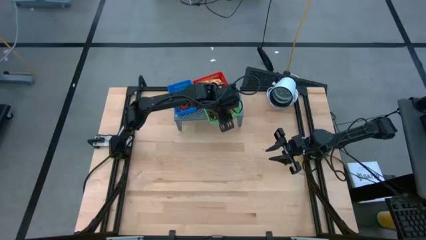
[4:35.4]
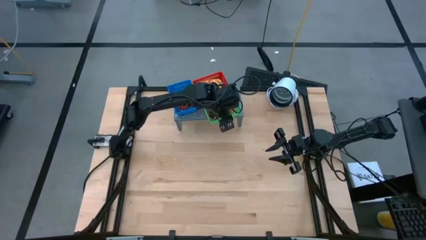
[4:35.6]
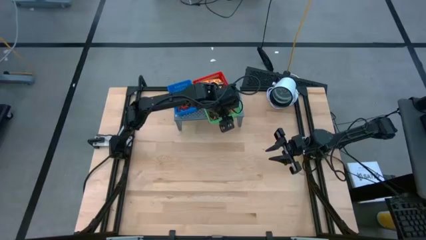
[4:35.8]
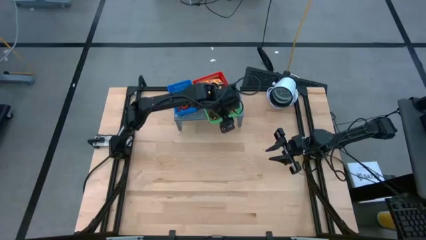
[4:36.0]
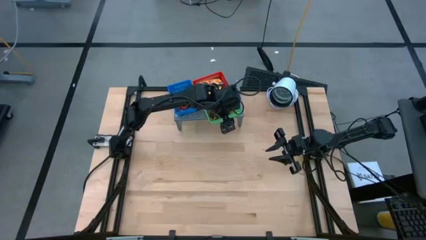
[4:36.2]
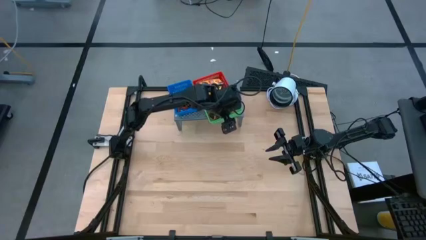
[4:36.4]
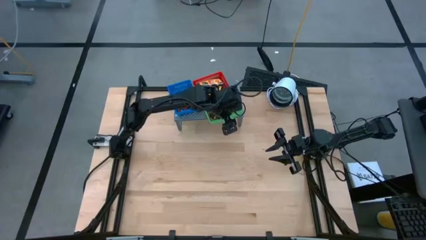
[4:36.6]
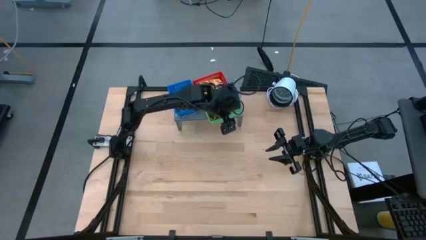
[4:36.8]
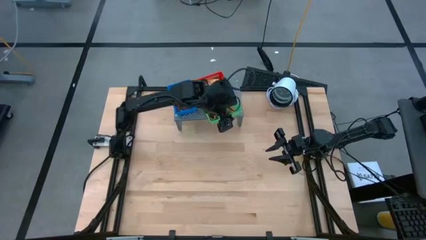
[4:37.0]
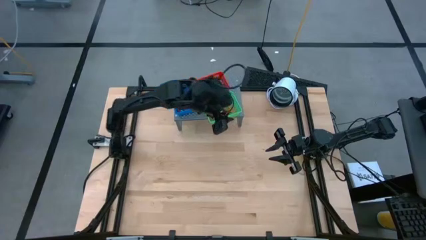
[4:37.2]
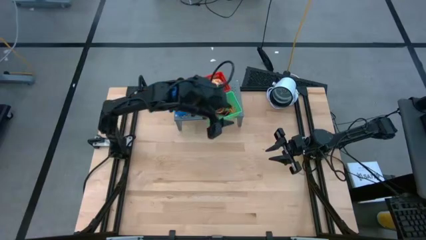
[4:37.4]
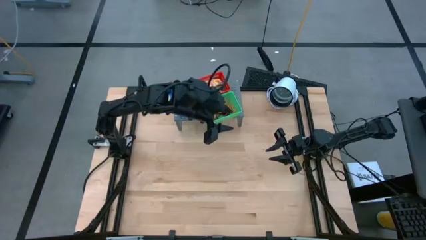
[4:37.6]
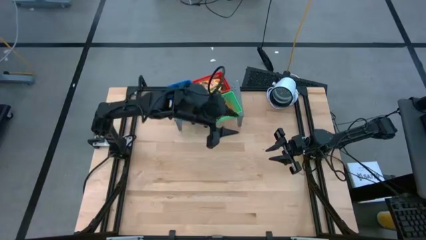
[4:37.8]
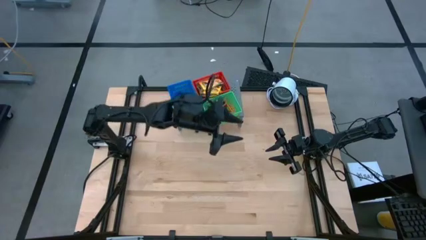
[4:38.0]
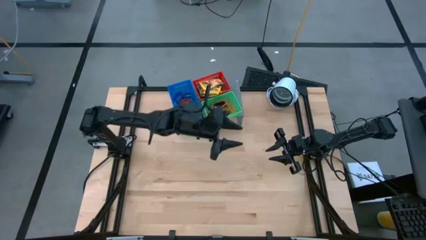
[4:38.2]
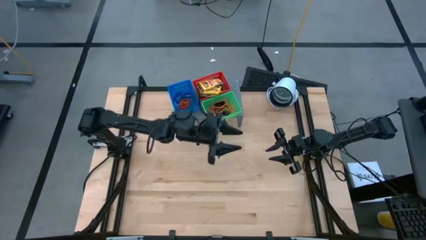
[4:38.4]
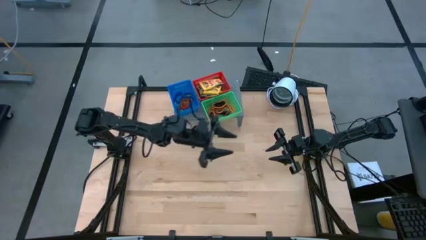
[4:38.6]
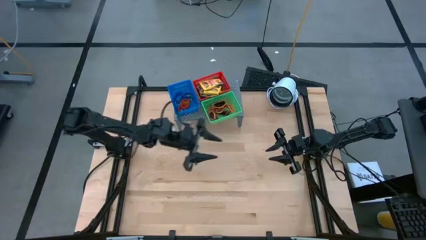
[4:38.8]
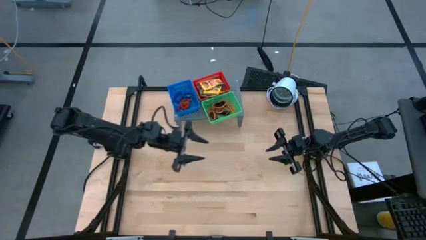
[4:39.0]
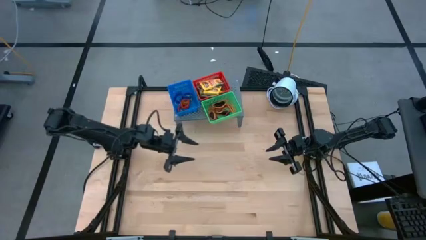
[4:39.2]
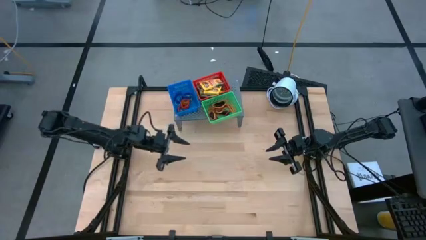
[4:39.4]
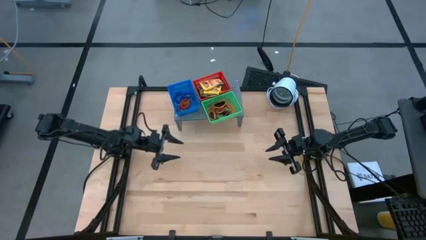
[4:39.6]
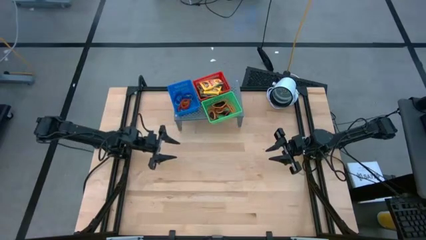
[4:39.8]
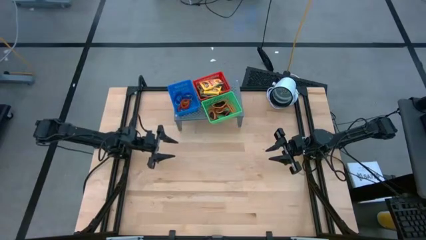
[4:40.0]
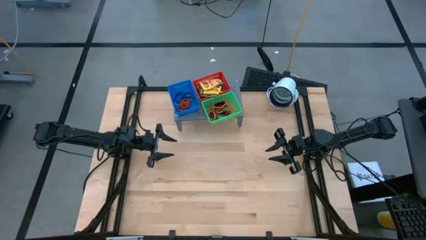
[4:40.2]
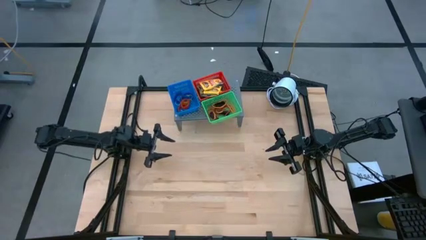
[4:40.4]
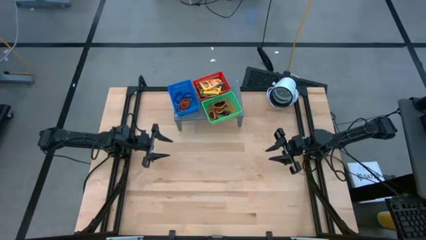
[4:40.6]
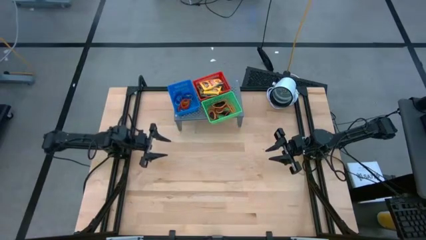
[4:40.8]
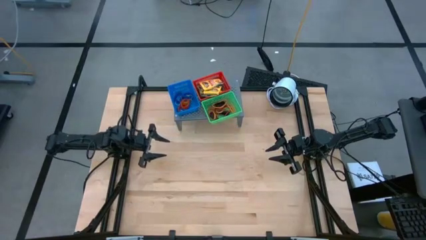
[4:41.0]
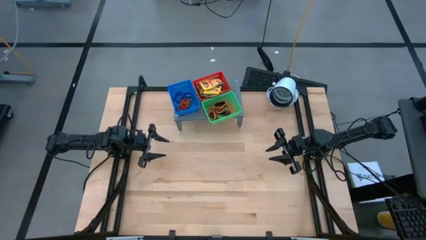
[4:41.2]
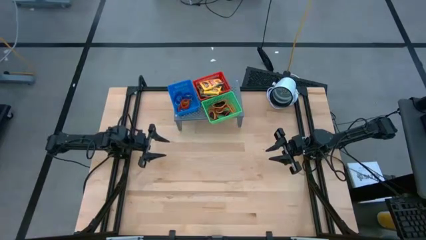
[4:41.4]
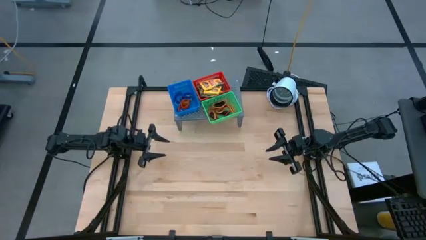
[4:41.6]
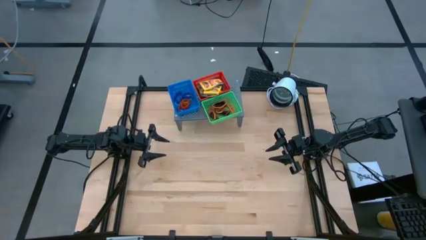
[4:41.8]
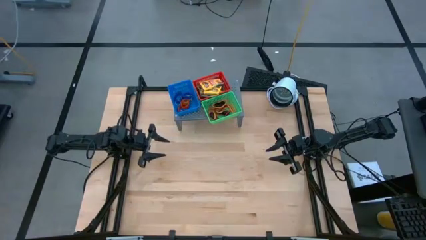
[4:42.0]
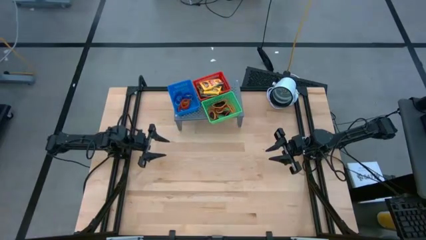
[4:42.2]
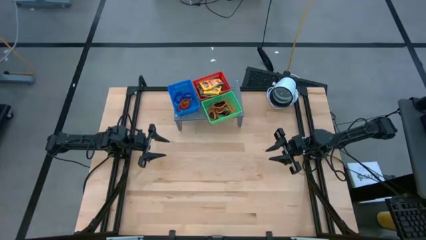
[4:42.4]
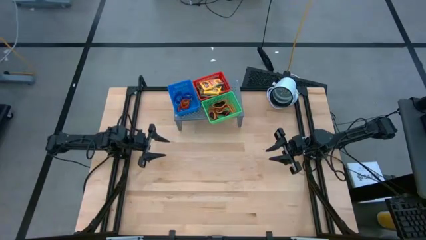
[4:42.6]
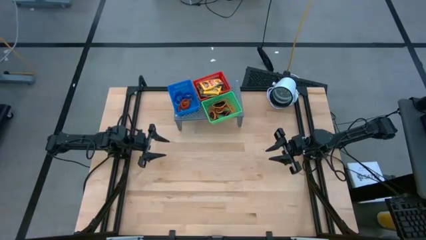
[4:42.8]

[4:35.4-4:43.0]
Task: Pick & Place Office Desk Supplies
Return to Home Position
